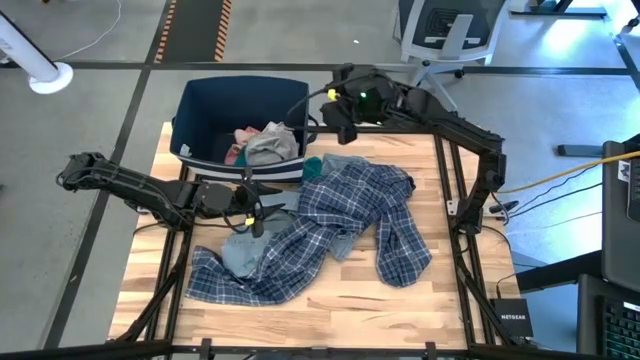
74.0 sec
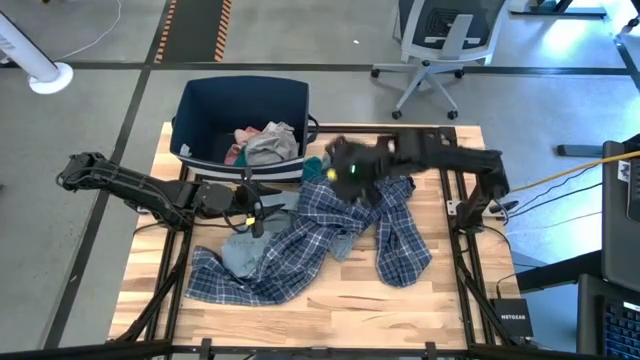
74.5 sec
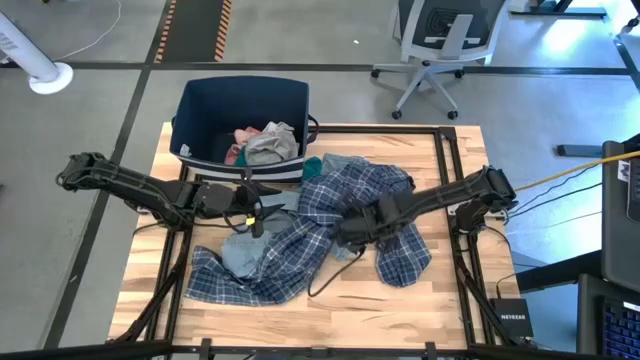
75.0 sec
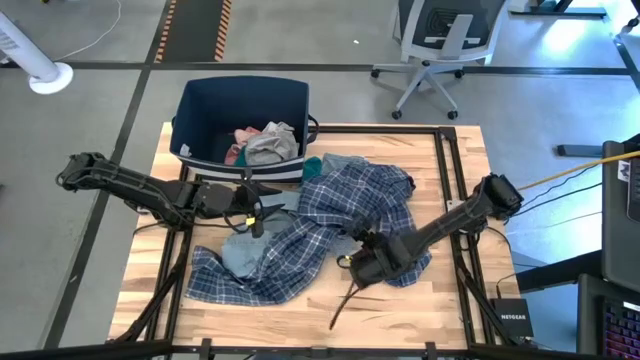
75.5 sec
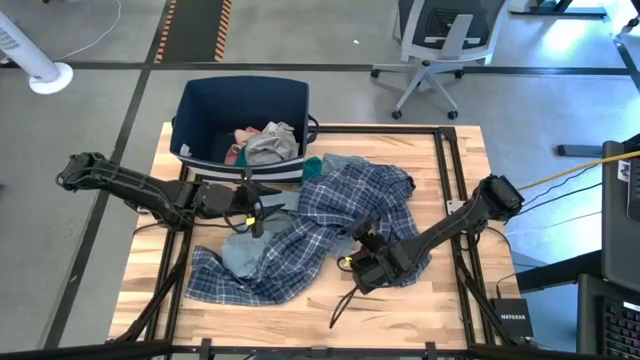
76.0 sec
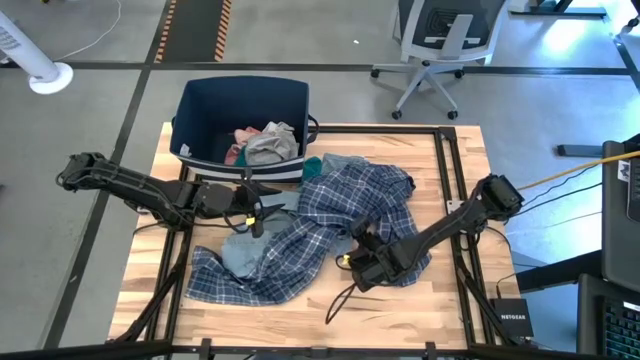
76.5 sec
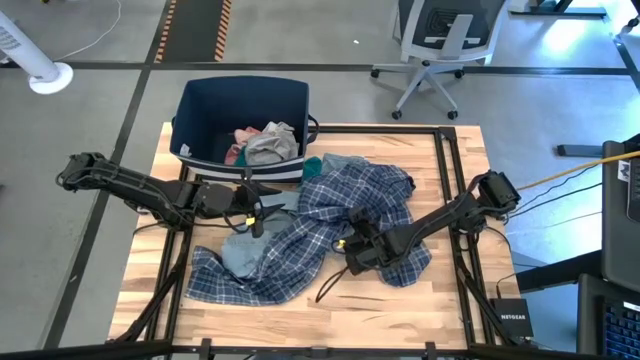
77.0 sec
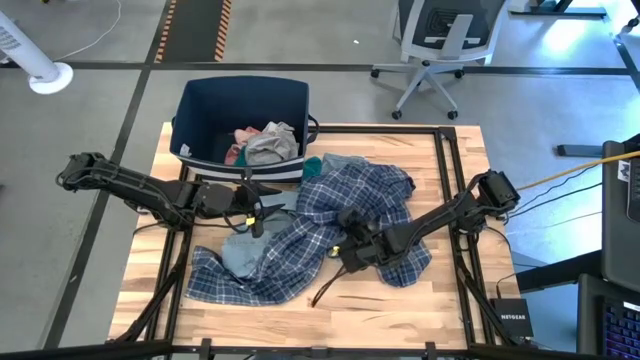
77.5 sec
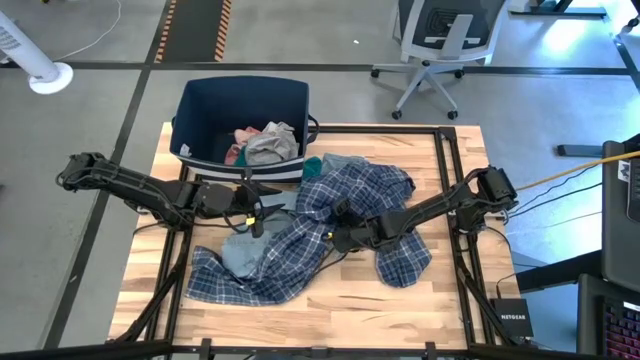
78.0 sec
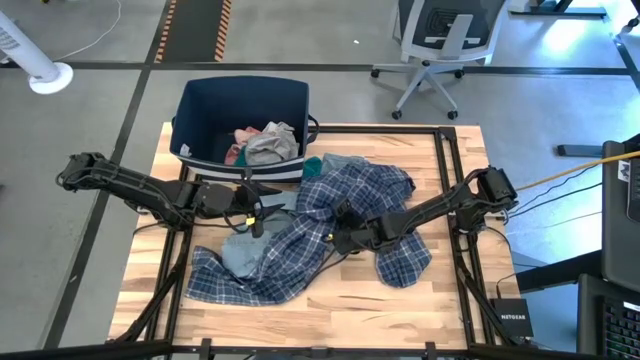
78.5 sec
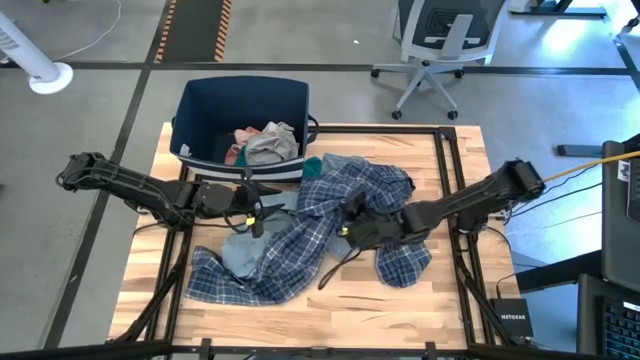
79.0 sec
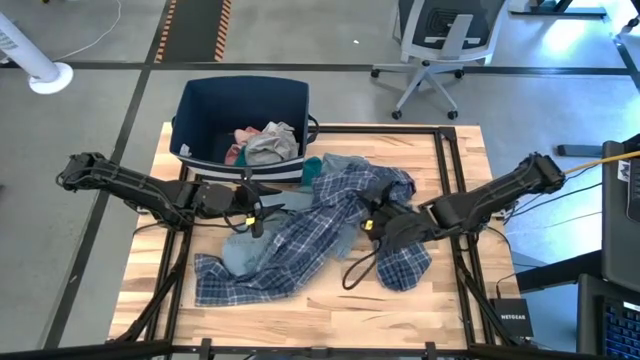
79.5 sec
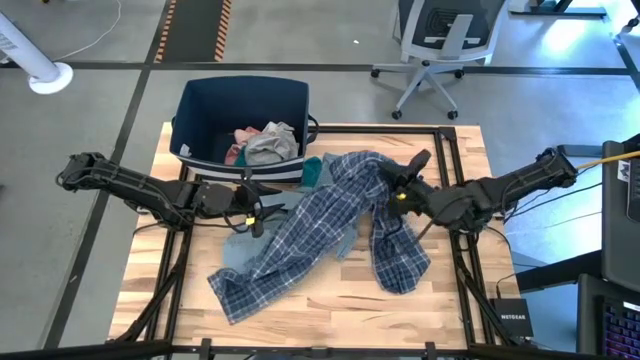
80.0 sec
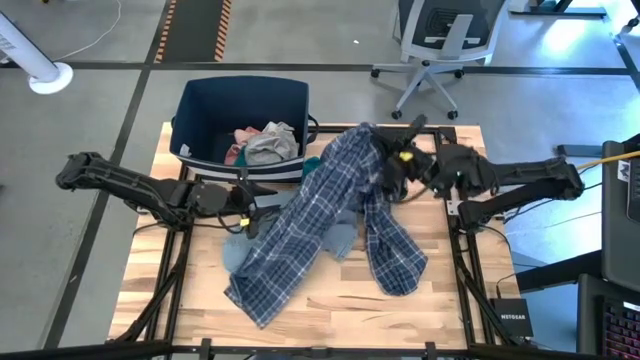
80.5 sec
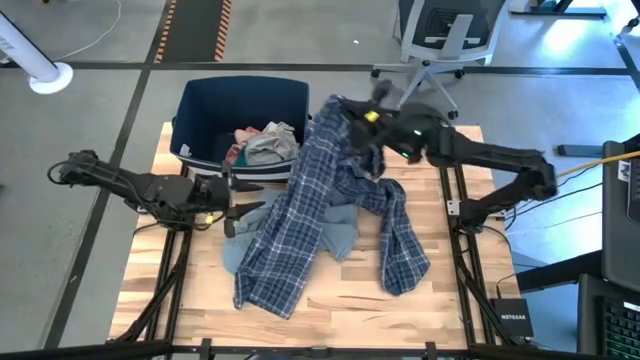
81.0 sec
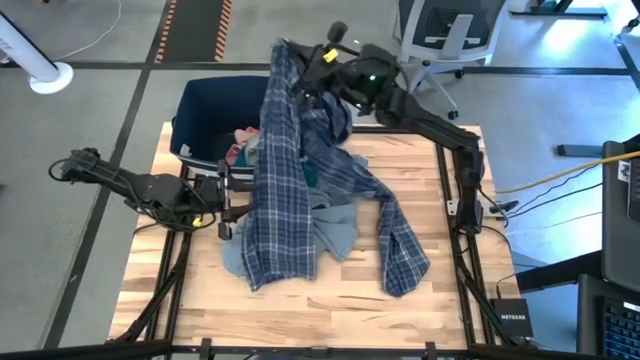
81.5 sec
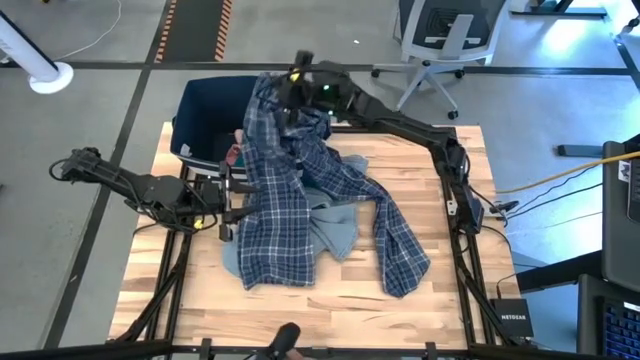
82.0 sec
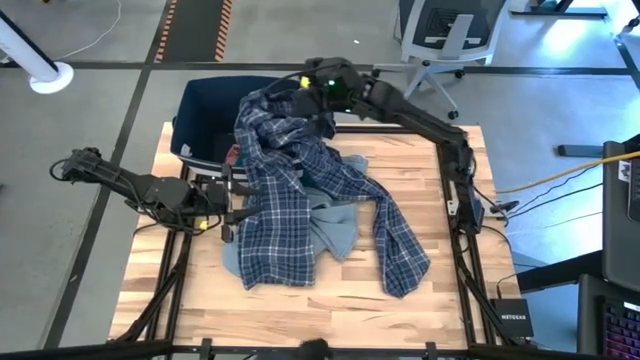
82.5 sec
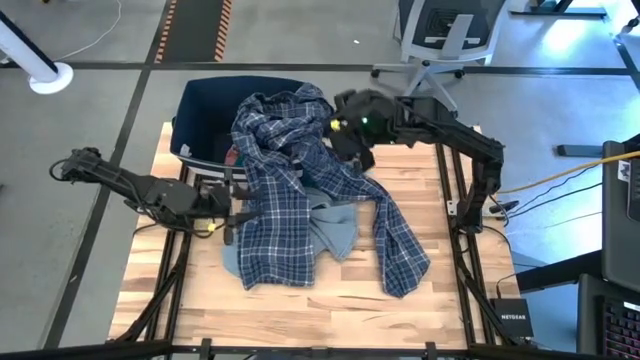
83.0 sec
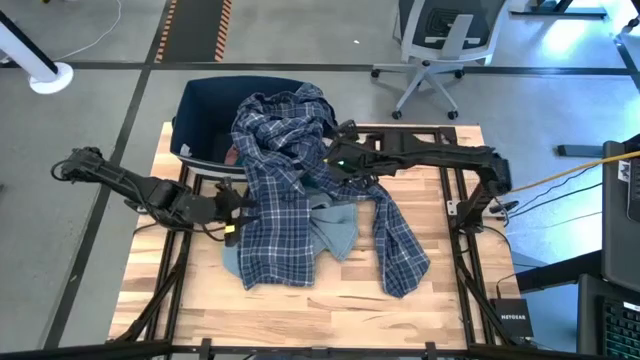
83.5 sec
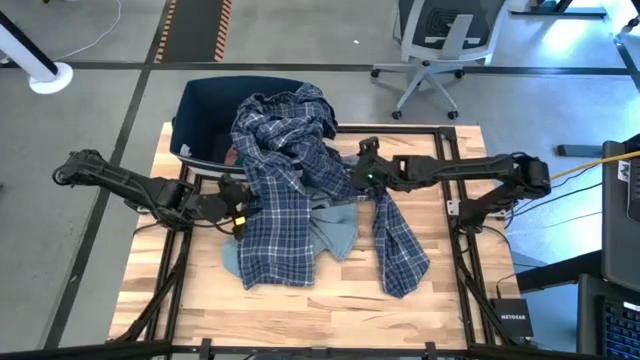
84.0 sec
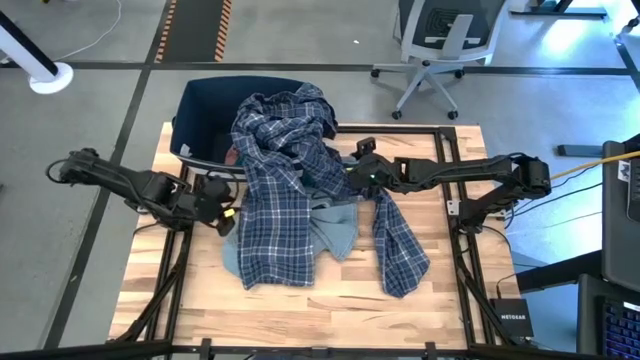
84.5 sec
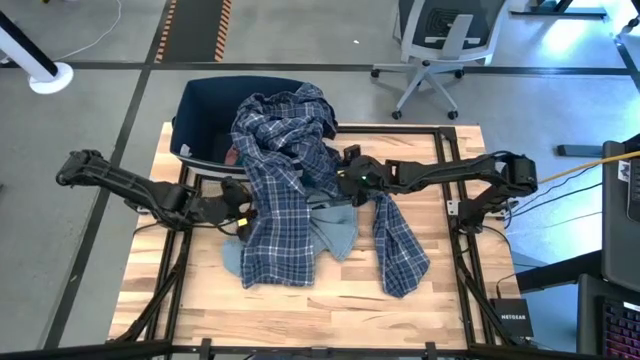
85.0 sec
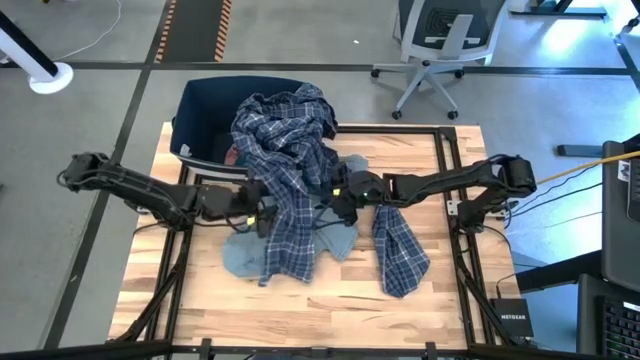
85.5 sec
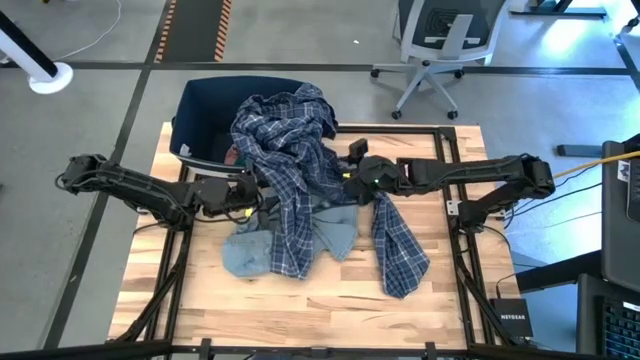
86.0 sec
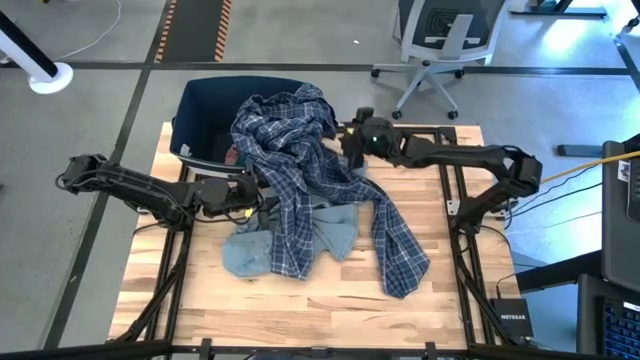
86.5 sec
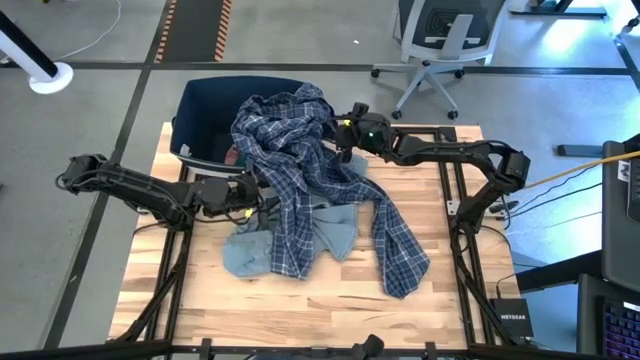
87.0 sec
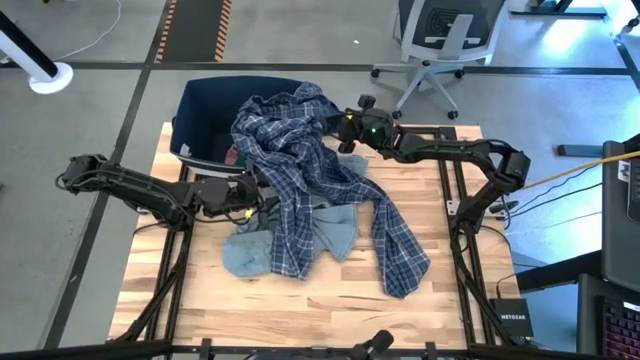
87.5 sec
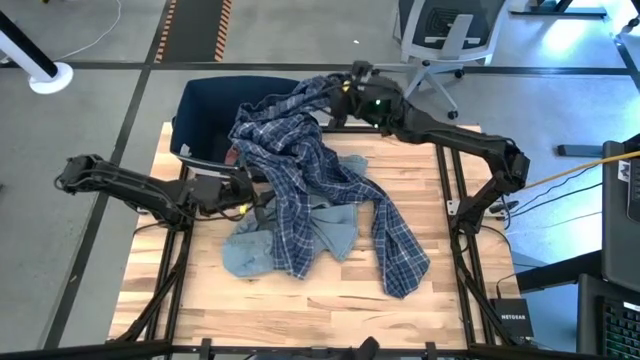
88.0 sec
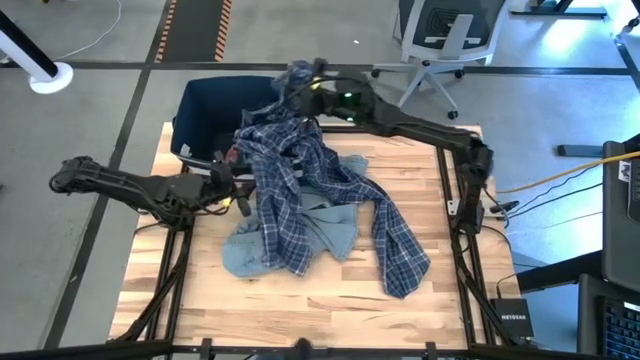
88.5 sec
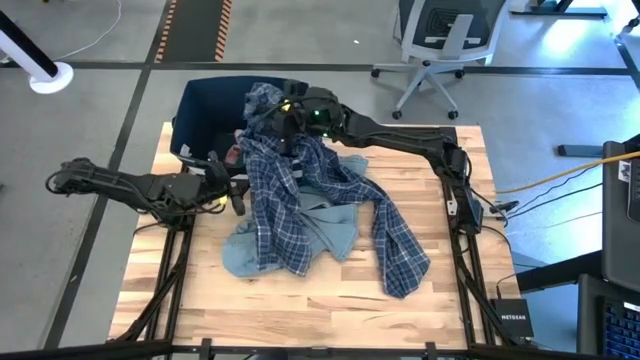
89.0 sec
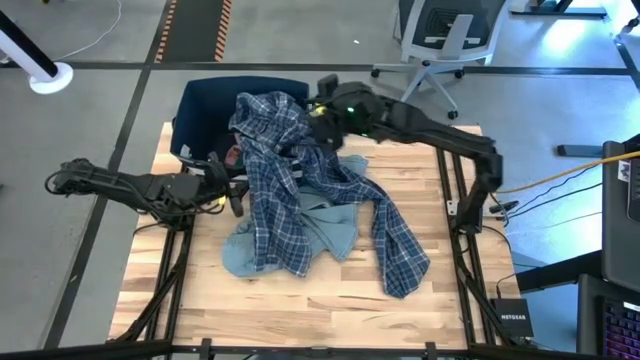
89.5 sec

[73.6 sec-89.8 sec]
Task: Sort clothes
Put the blue patterned pajama into the blue laundry bin

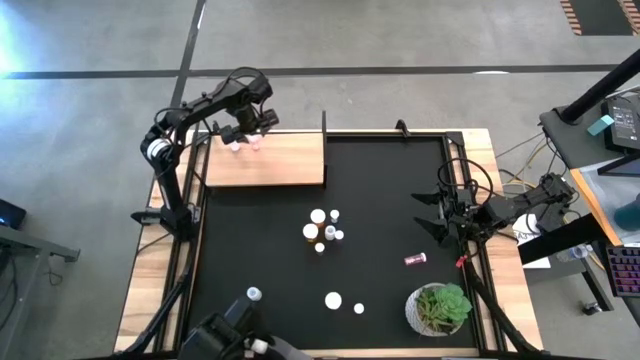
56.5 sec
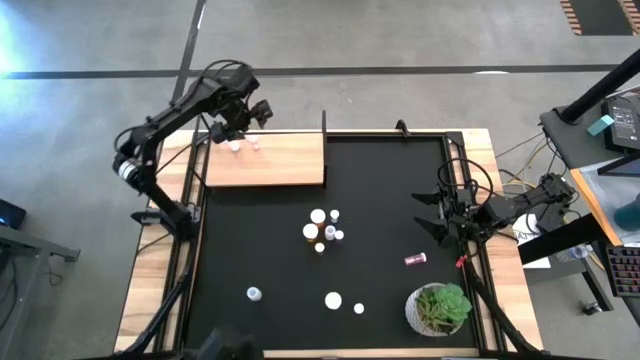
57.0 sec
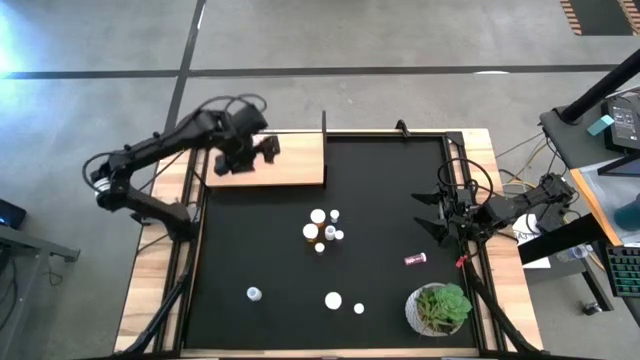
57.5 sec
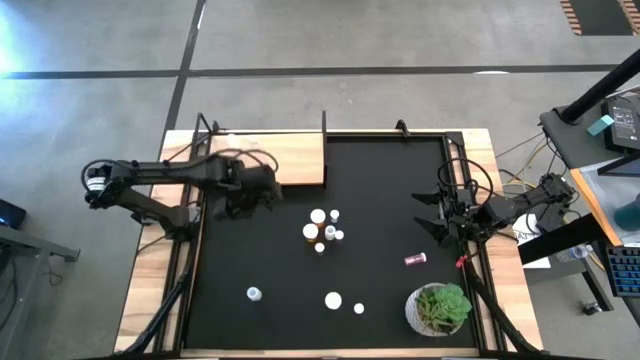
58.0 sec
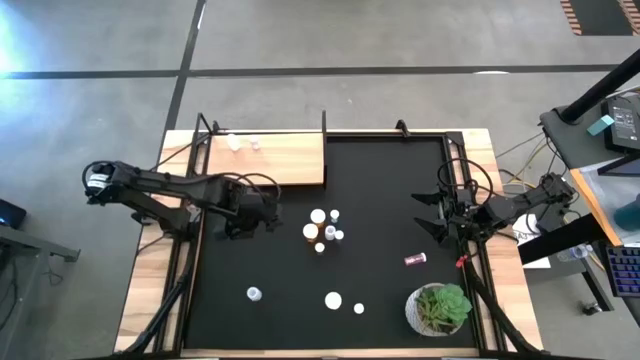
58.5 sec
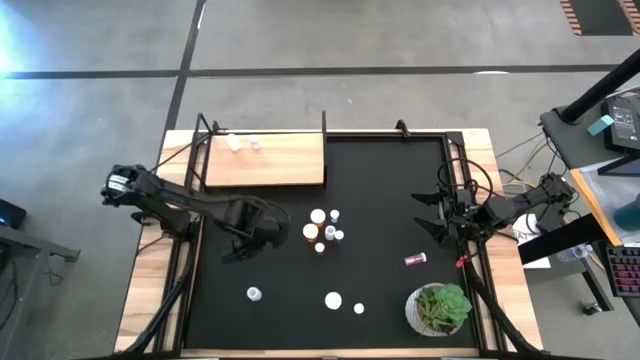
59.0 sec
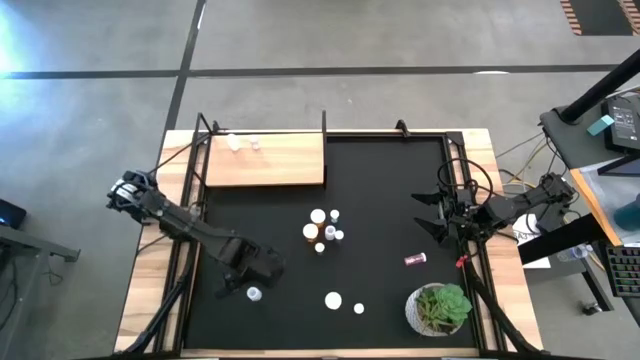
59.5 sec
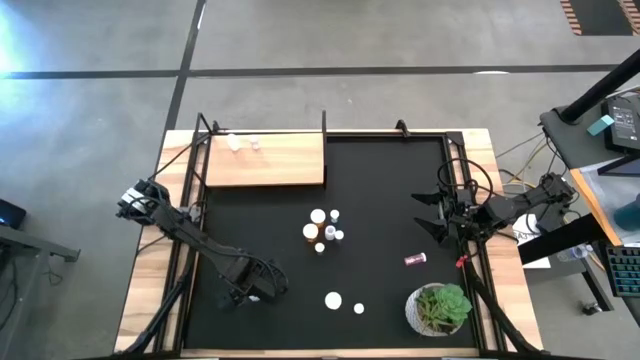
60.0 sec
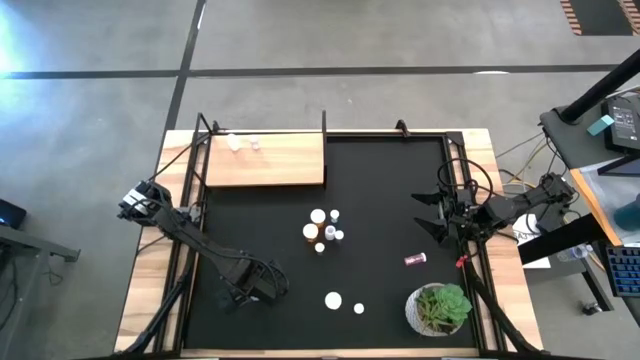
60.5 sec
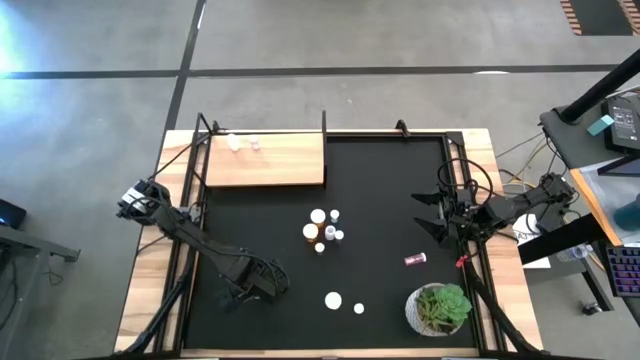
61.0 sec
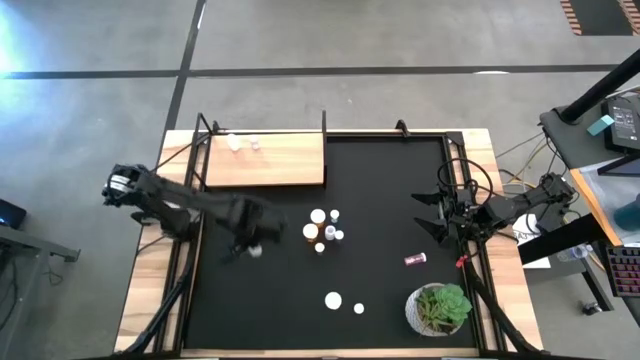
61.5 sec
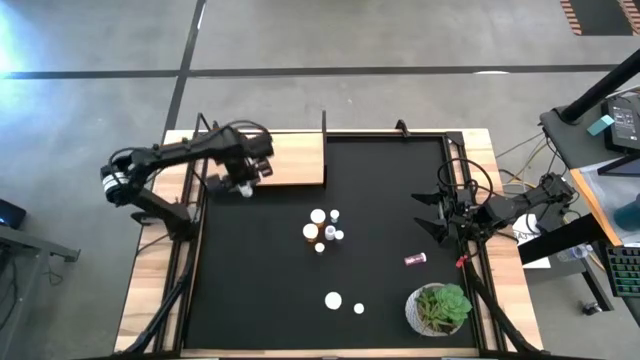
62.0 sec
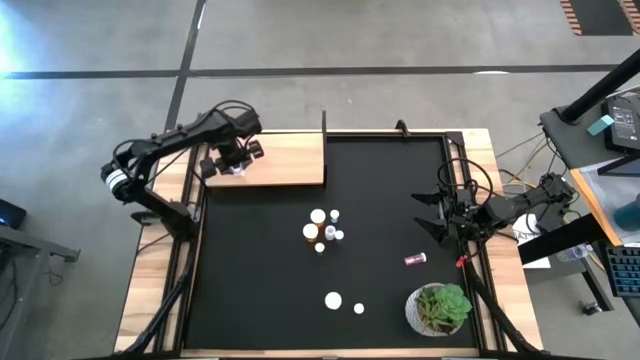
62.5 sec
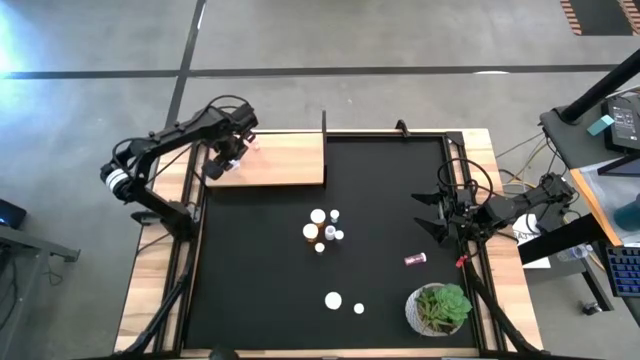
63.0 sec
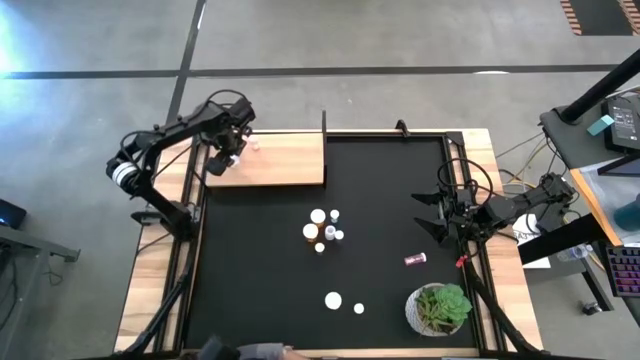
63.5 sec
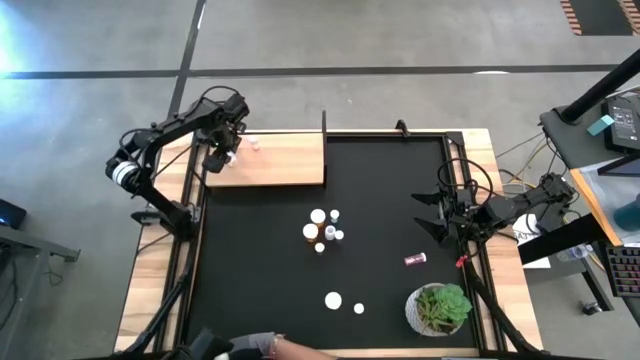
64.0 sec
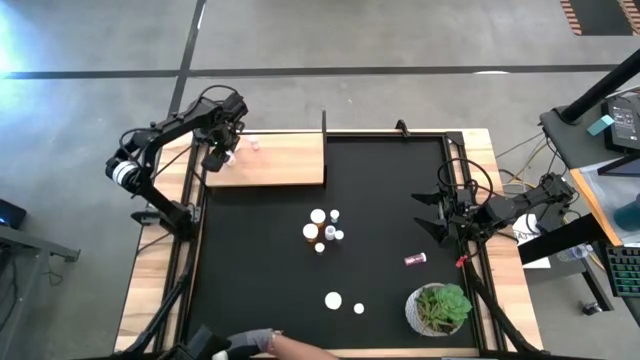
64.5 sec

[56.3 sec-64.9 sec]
Task: Pick and place medicine bottles onto shelf by color
Put the bottom white pill bottle on the shelf aligned with the other white pill bottle
